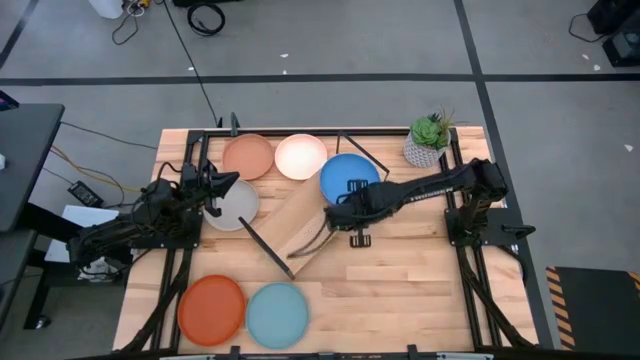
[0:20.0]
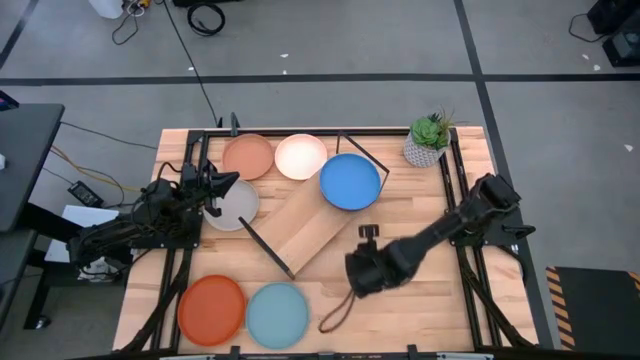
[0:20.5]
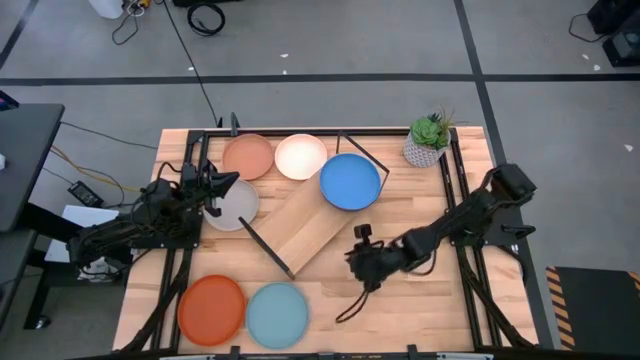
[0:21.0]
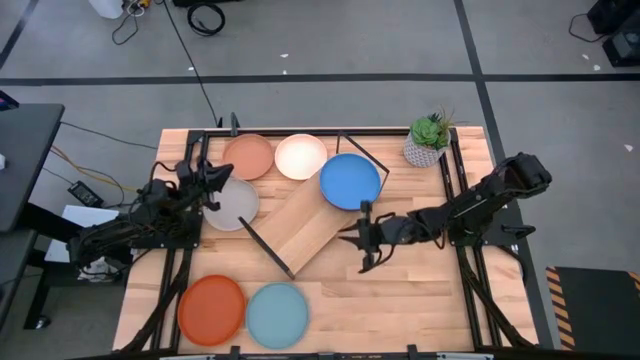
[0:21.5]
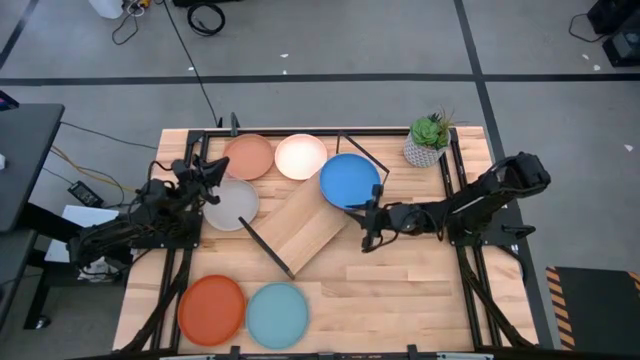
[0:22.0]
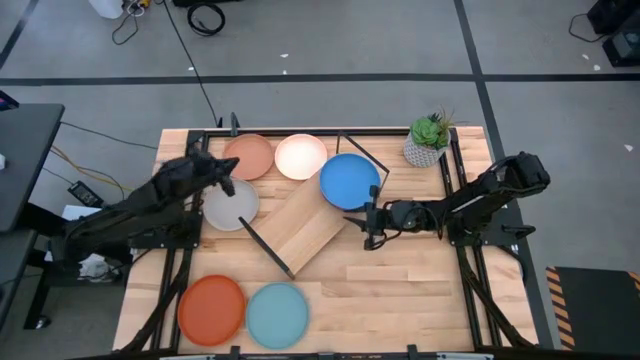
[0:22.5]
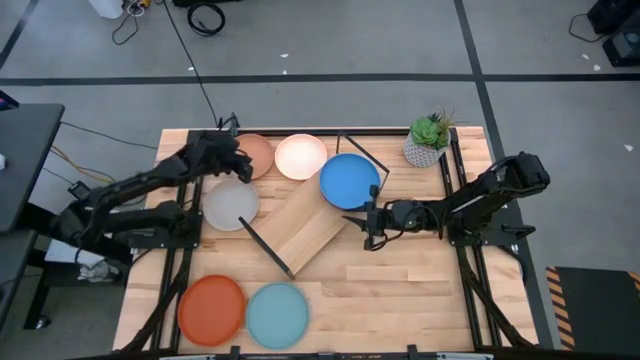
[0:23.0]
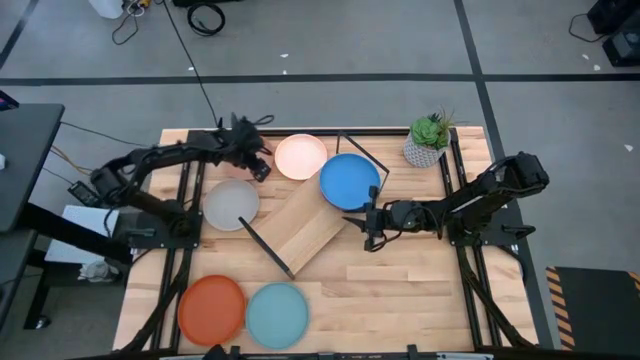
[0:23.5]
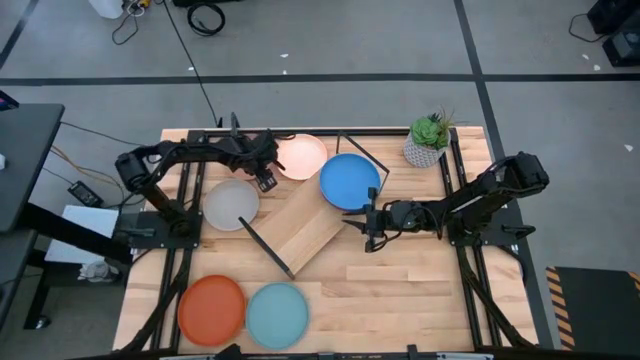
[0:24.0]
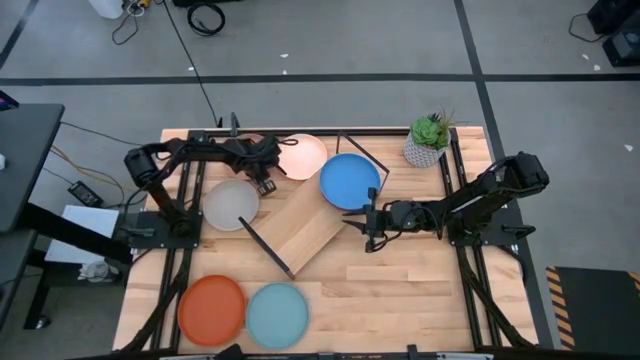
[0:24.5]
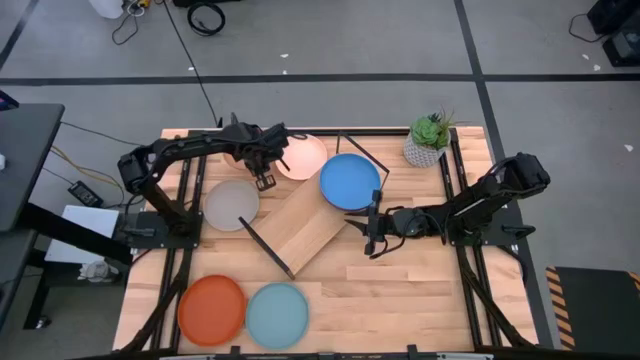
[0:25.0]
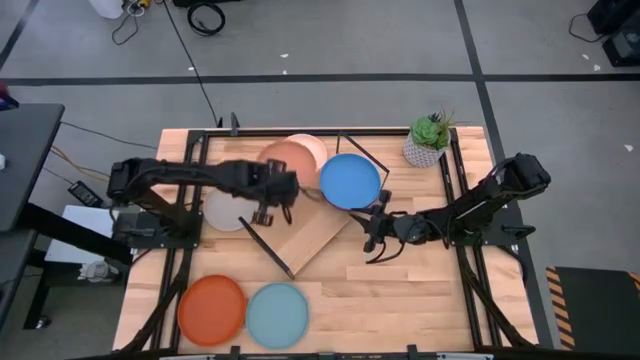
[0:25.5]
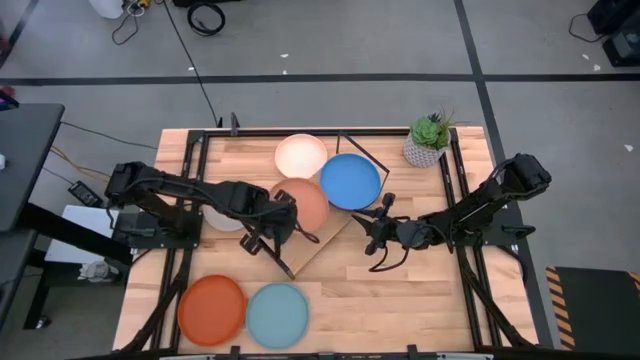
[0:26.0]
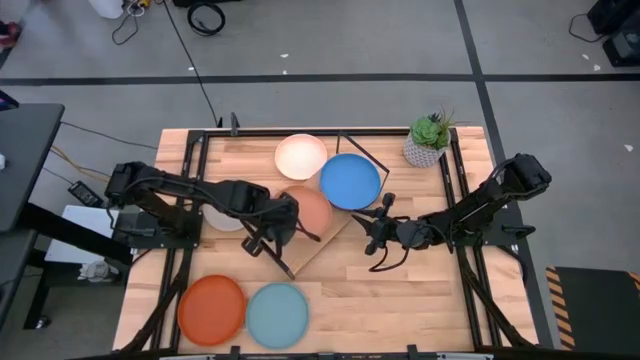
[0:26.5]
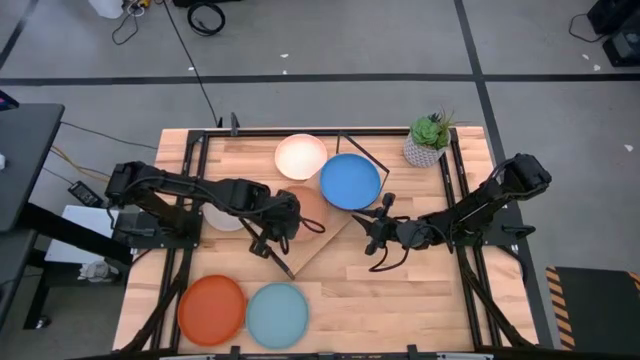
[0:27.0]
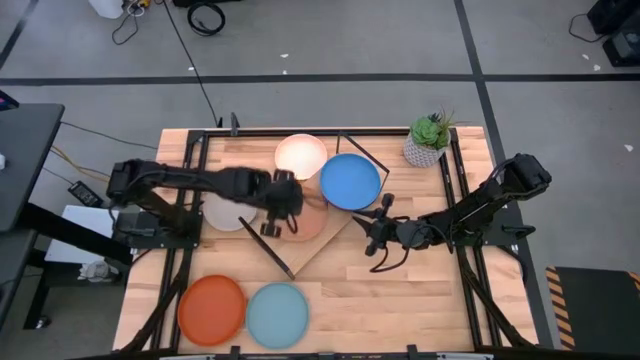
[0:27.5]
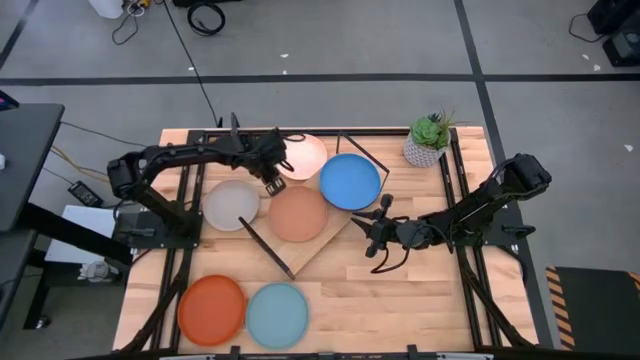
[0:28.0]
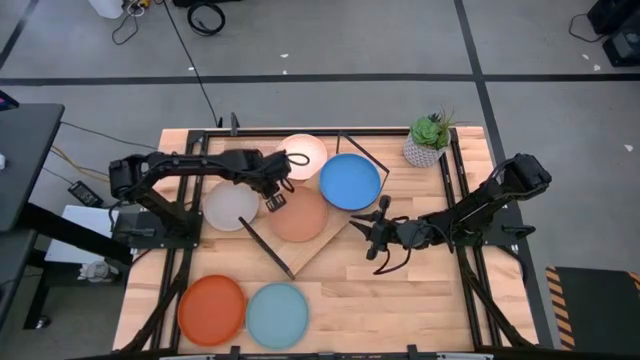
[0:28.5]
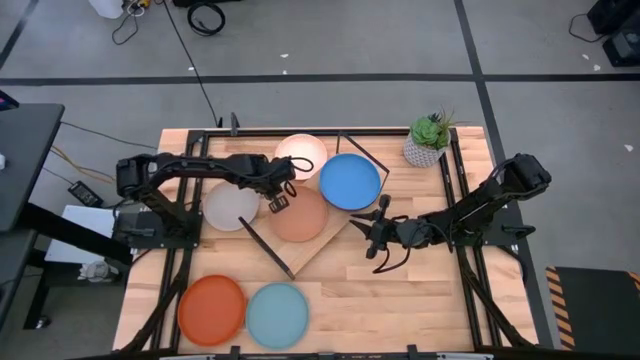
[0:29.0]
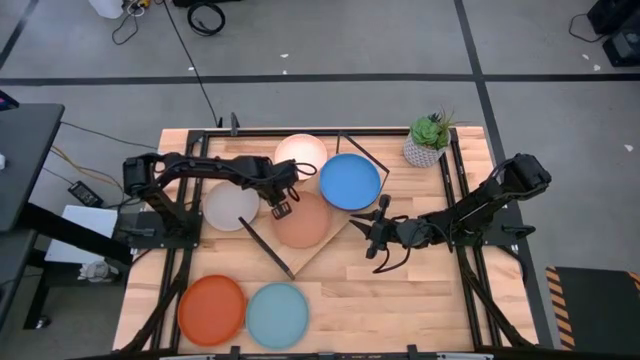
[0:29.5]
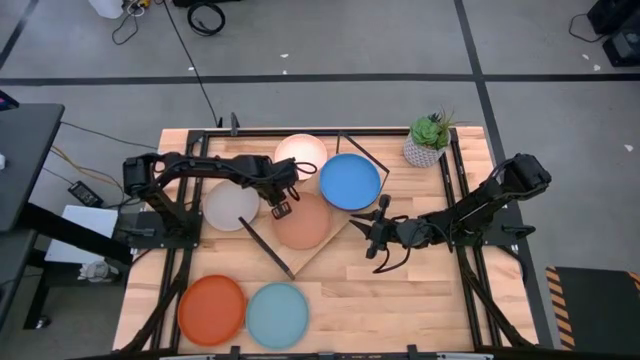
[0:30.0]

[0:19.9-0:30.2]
Task: Place and stack plates onto a shelf
Put the brown plate on the shelf

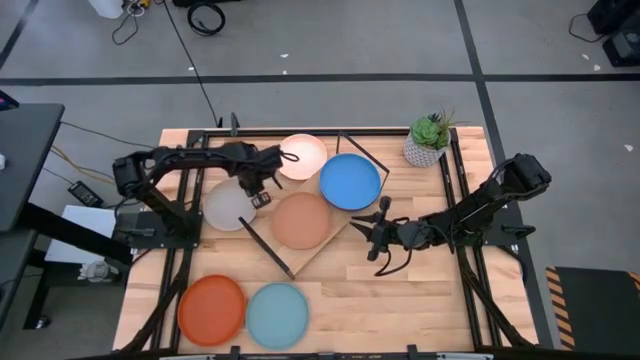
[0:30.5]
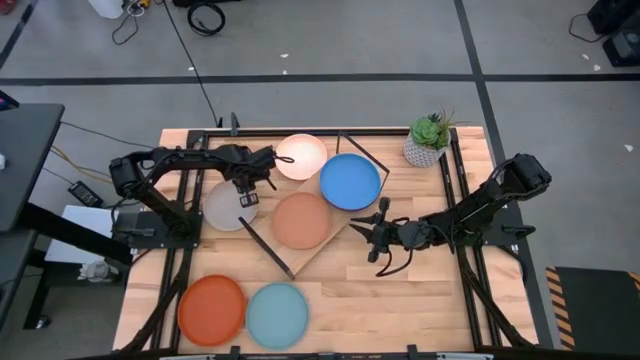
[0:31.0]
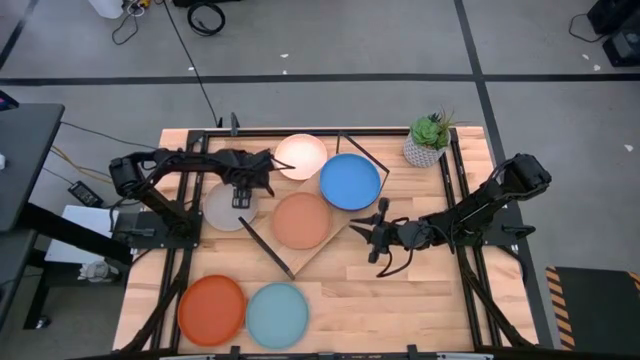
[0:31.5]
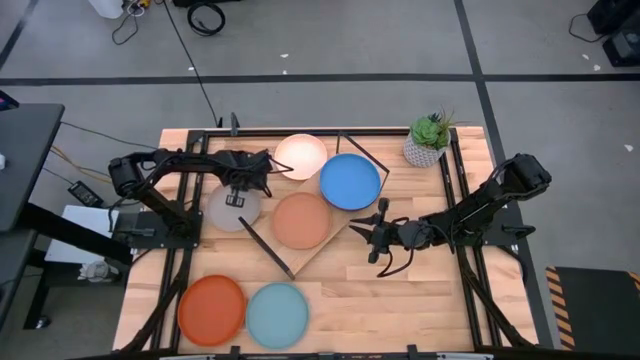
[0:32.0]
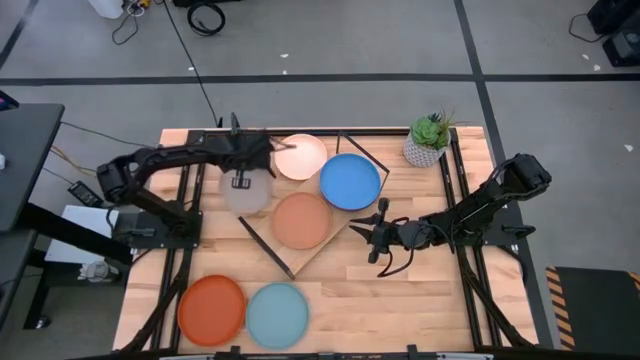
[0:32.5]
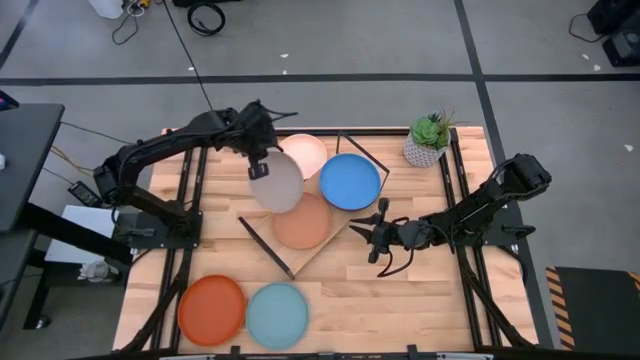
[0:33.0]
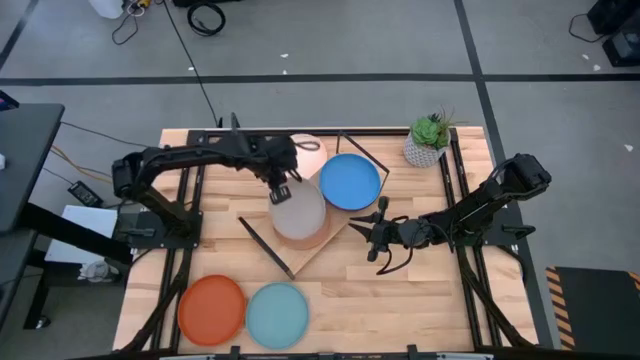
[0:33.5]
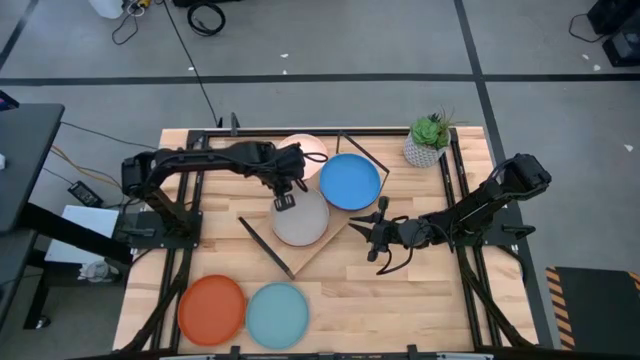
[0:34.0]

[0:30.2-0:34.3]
Stack the gray plate on top of the brown plate

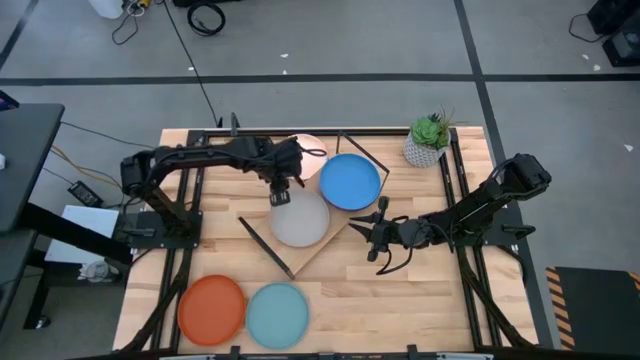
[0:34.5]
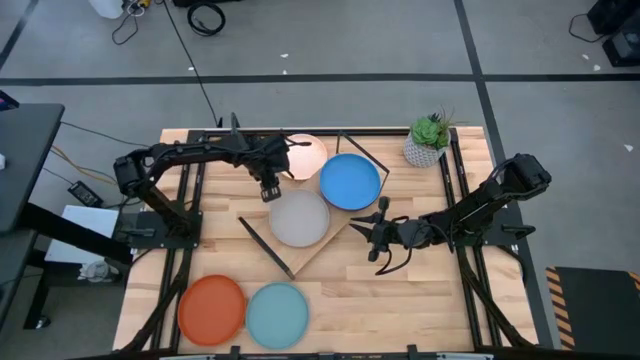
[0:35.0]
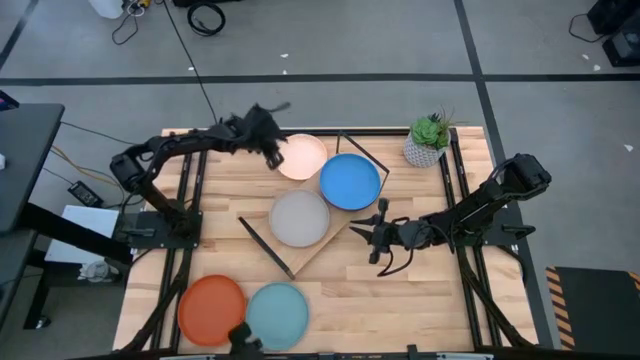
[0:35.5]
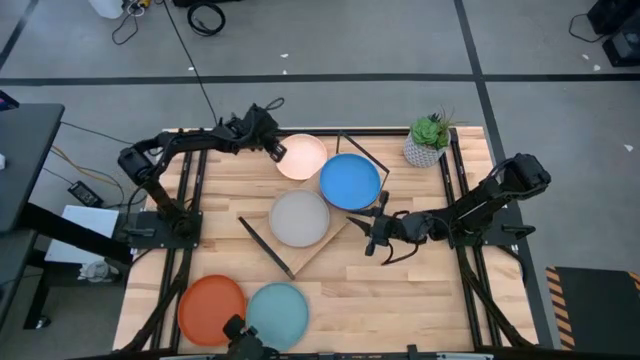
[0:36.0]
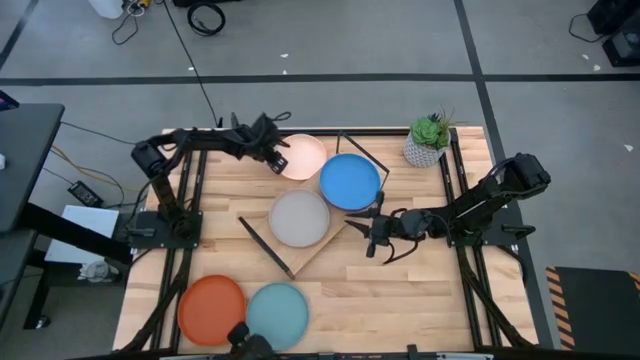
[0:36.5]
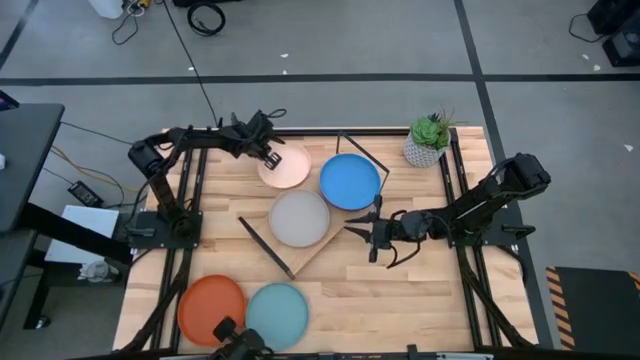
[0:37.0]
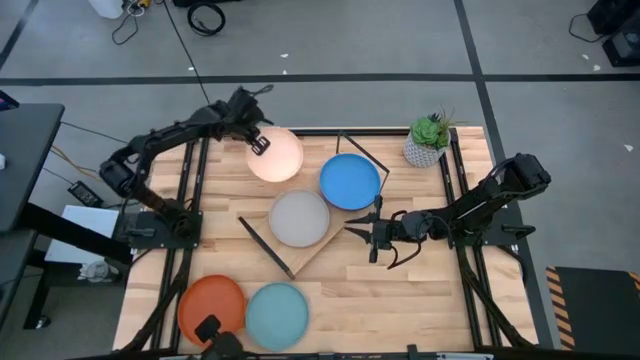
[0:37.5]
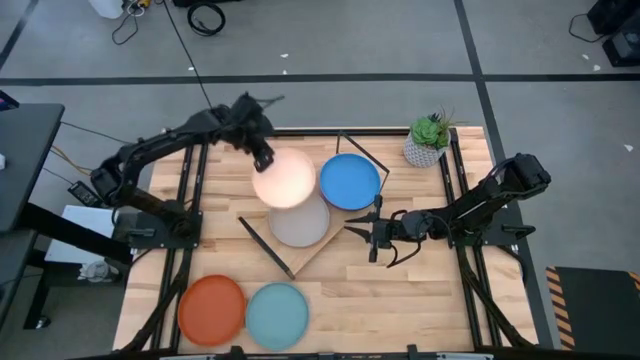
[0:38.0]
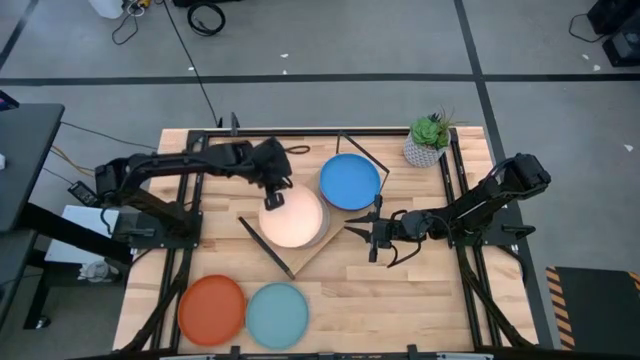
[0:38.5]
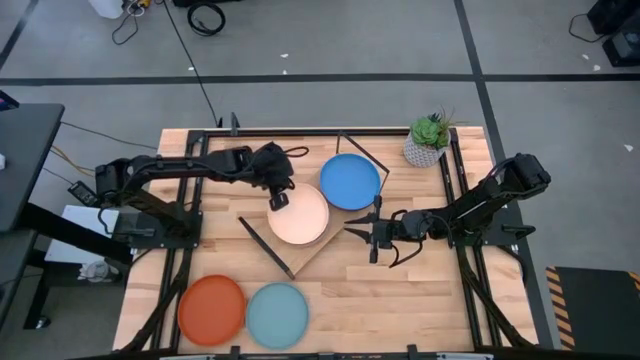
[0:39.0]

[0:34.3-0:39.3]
Stack the light orange plate on top of the gray plate

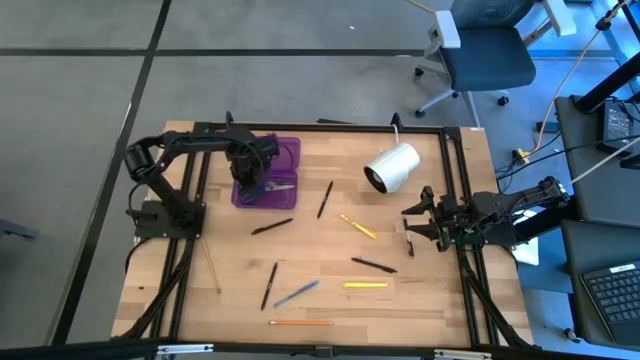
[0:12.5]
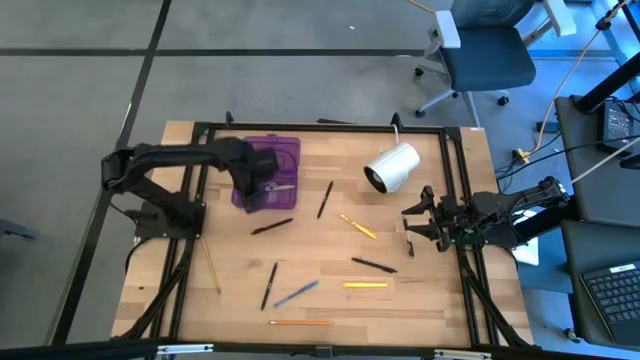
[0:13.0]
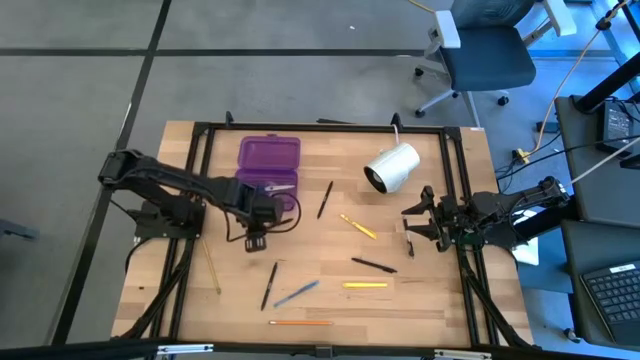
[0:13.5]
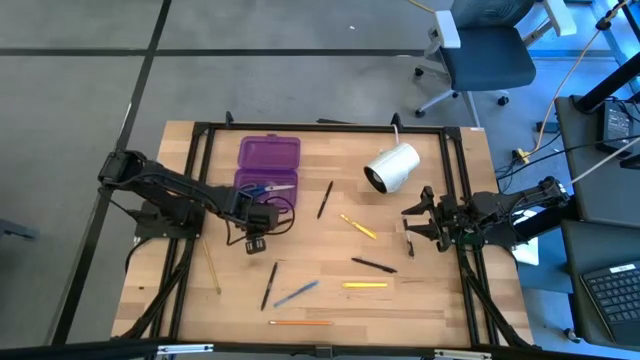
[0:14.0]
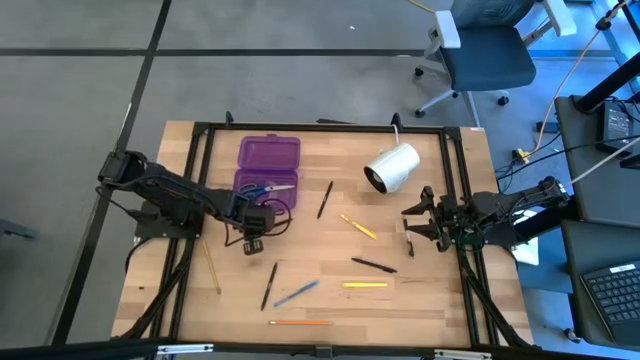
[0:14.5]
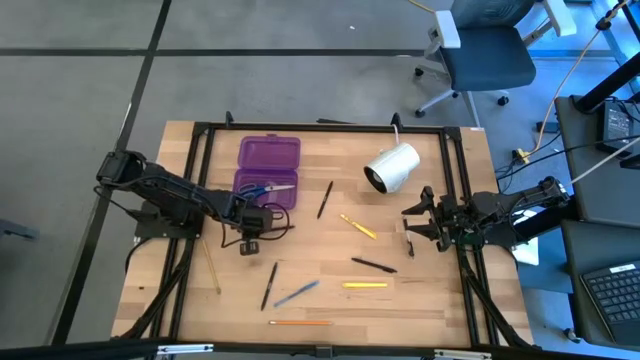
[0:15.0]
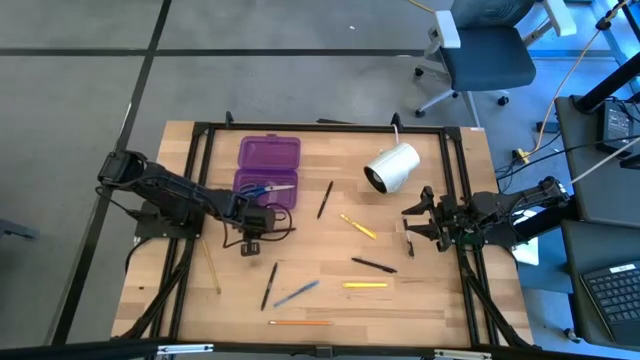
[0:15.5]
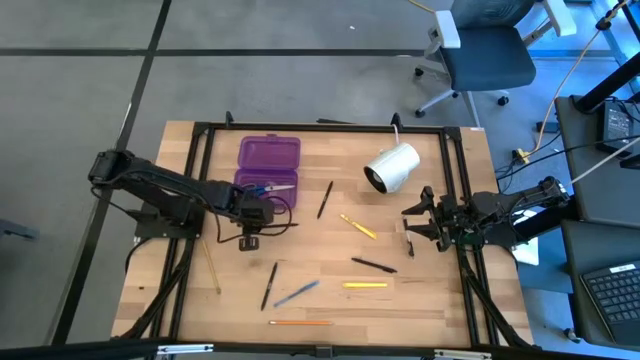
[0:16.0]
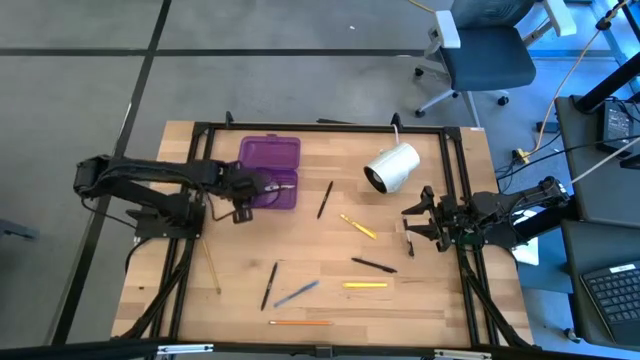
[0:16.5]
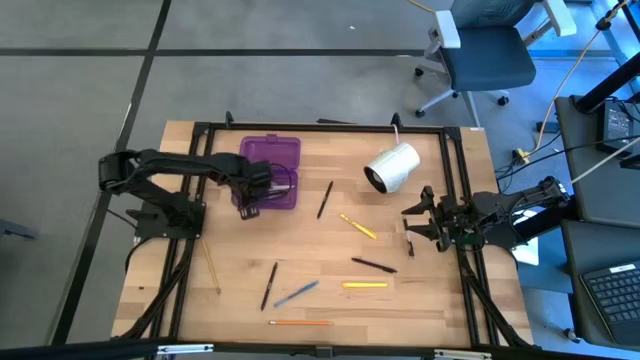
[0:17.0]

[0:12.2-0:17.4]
Task: Pick & place school supplies into a supply box
Put the black pen into the purple box organizer
